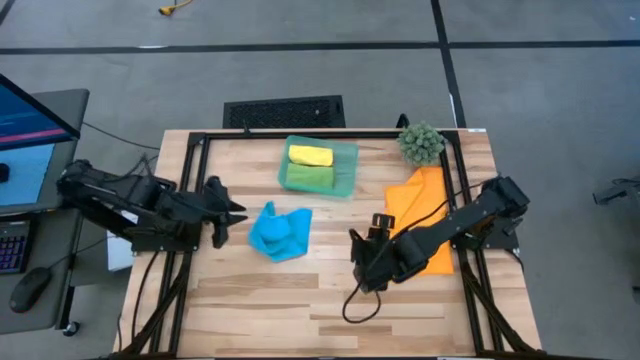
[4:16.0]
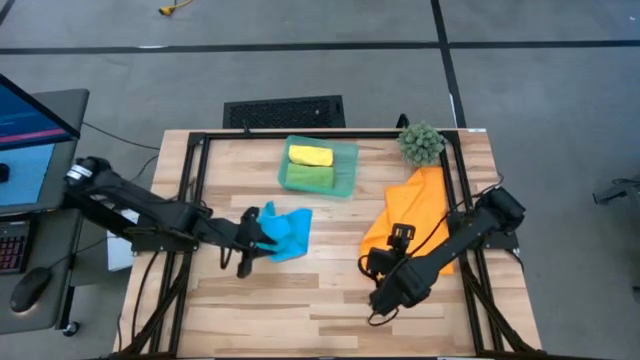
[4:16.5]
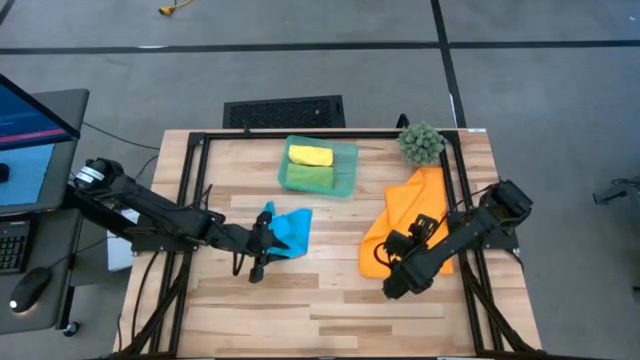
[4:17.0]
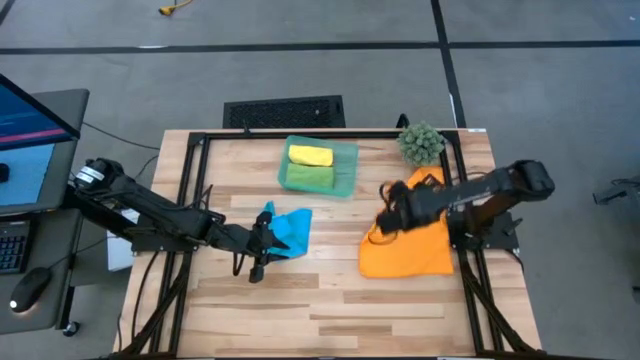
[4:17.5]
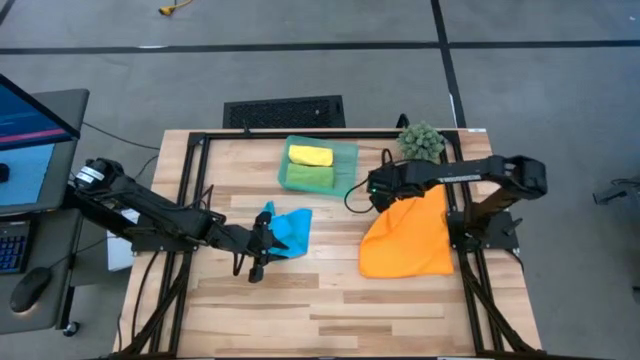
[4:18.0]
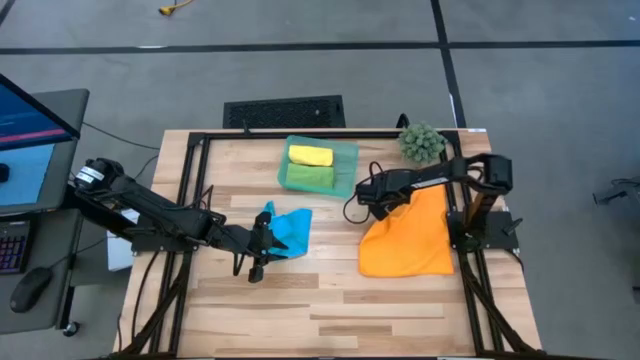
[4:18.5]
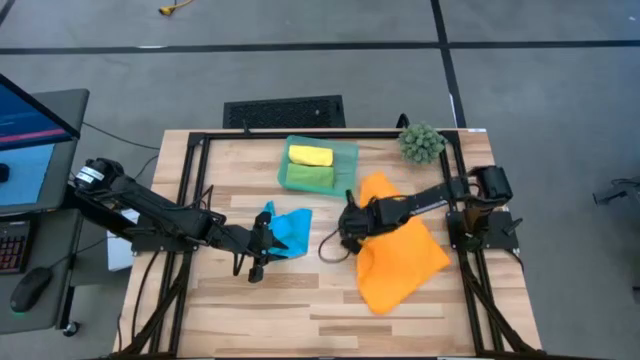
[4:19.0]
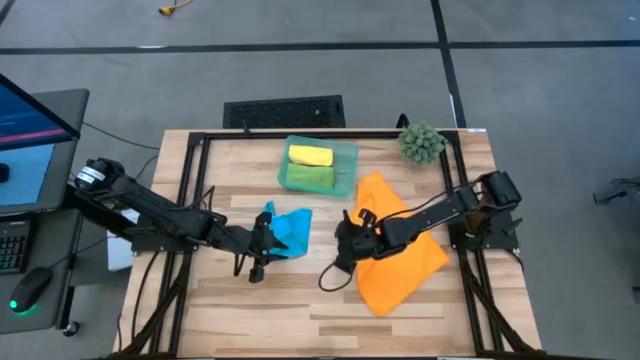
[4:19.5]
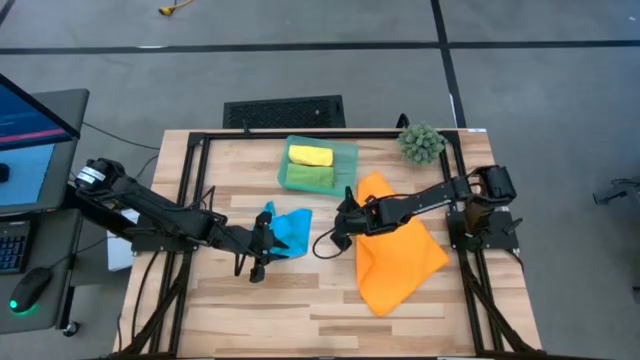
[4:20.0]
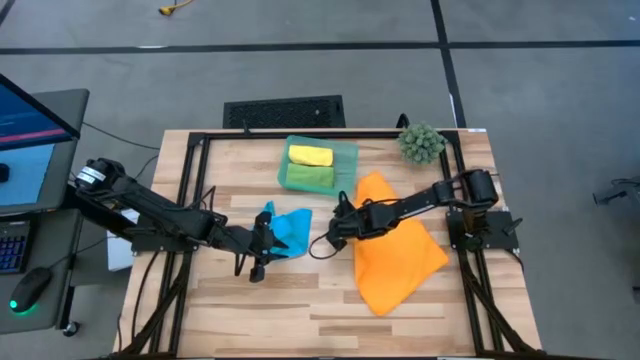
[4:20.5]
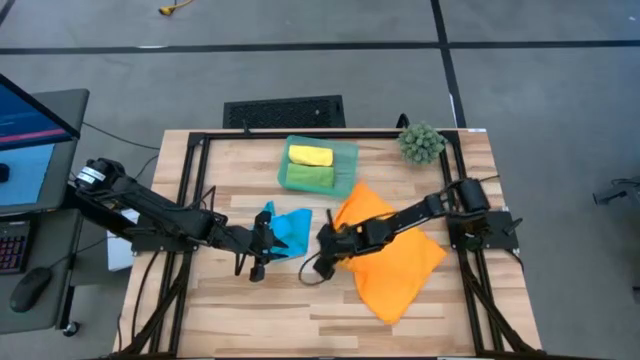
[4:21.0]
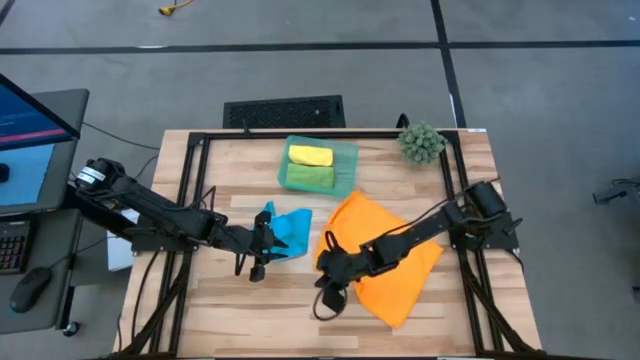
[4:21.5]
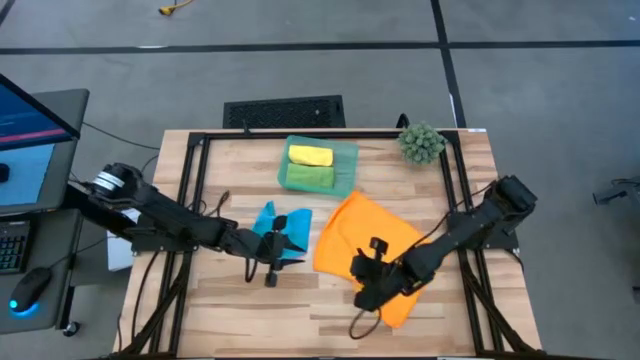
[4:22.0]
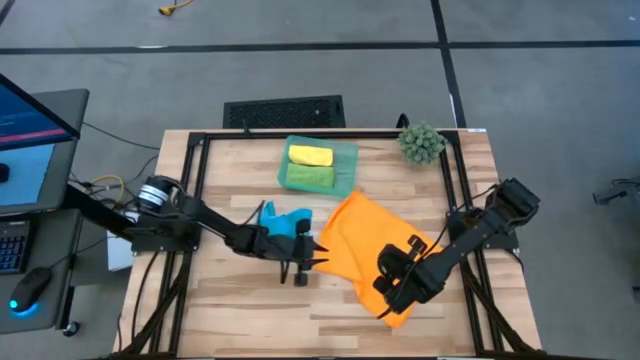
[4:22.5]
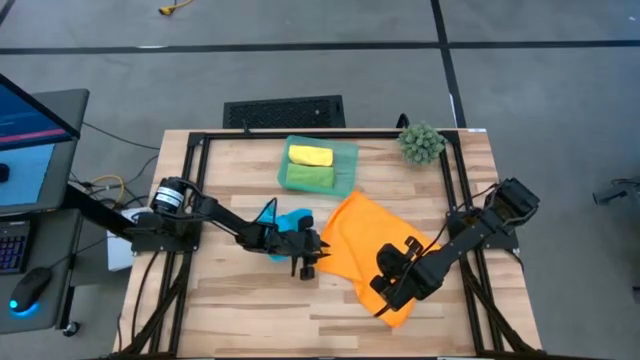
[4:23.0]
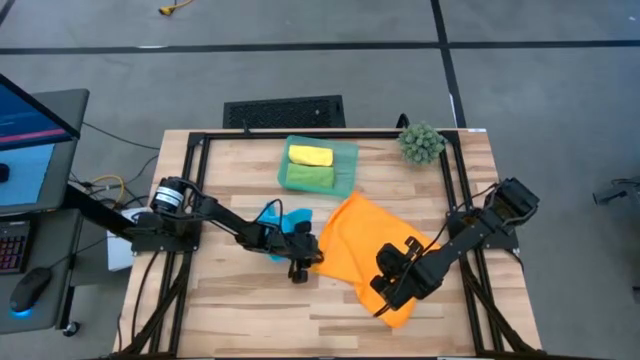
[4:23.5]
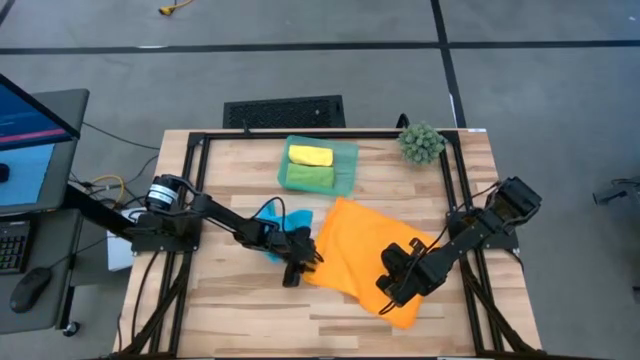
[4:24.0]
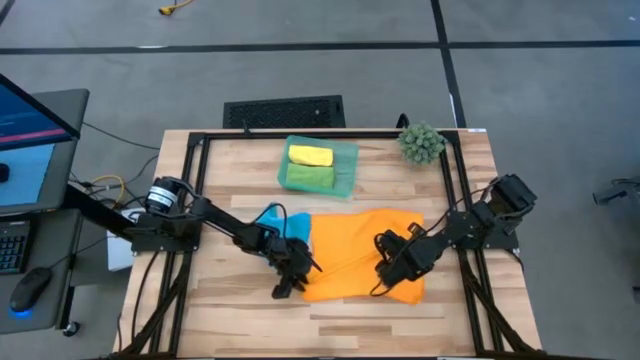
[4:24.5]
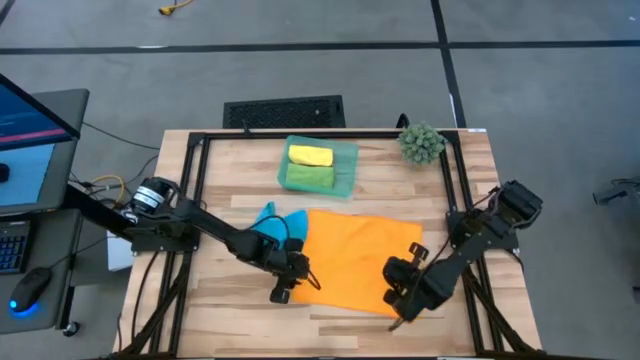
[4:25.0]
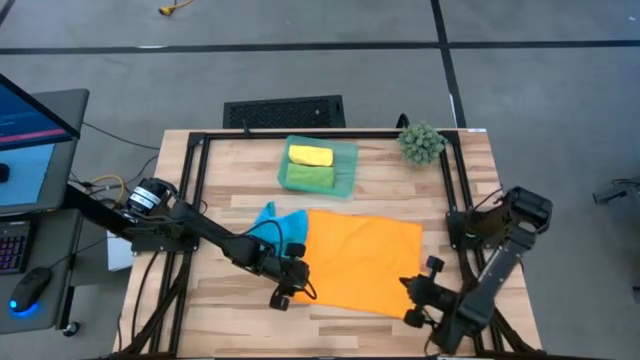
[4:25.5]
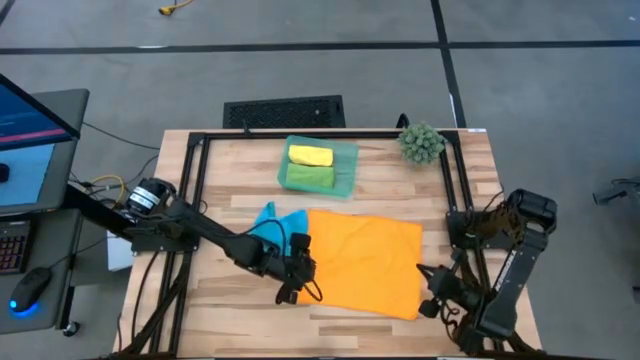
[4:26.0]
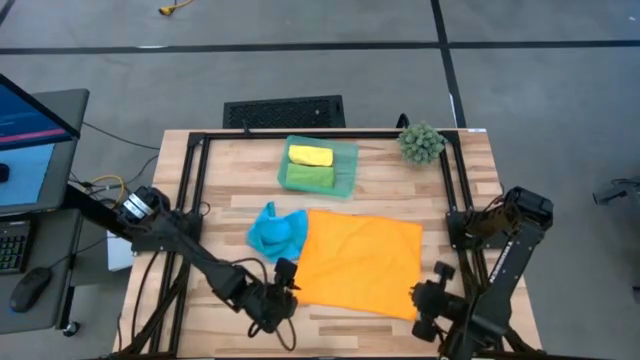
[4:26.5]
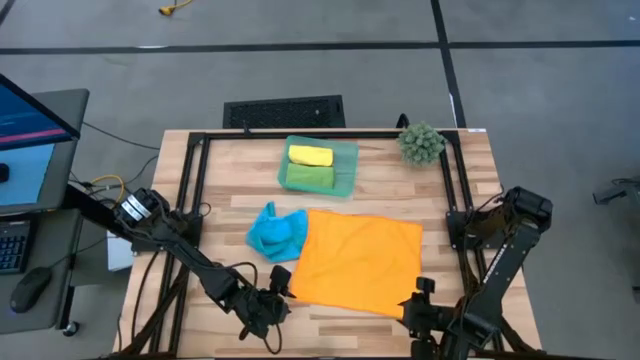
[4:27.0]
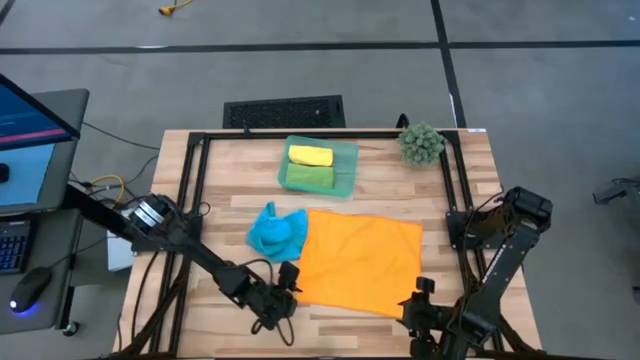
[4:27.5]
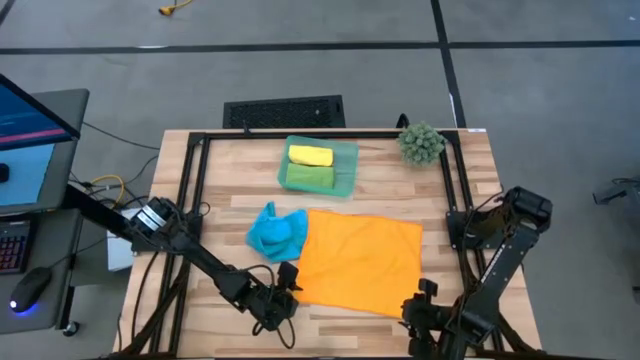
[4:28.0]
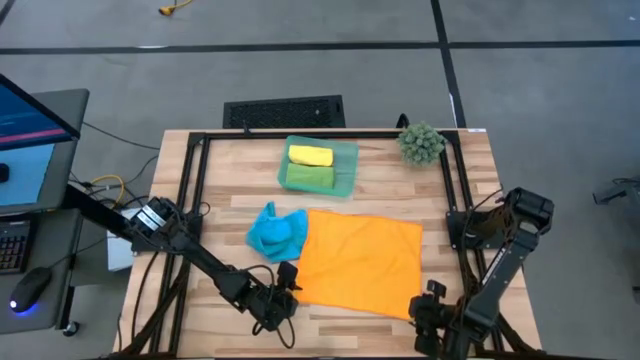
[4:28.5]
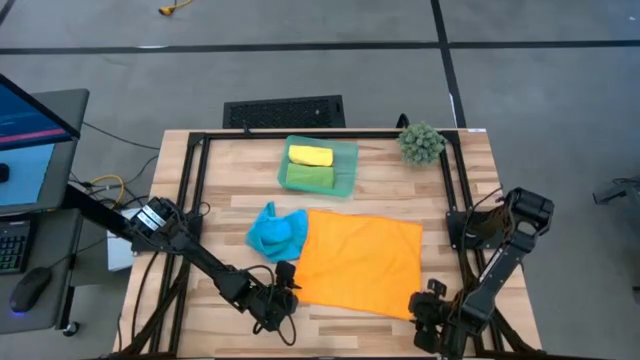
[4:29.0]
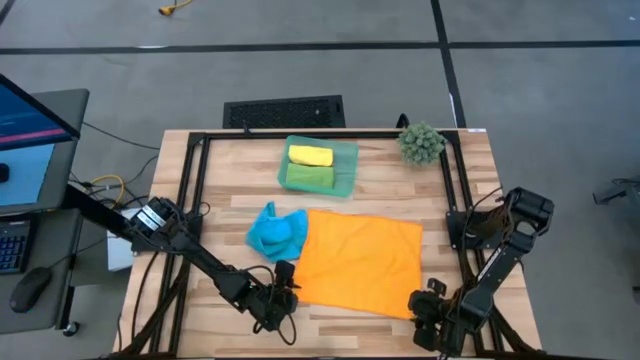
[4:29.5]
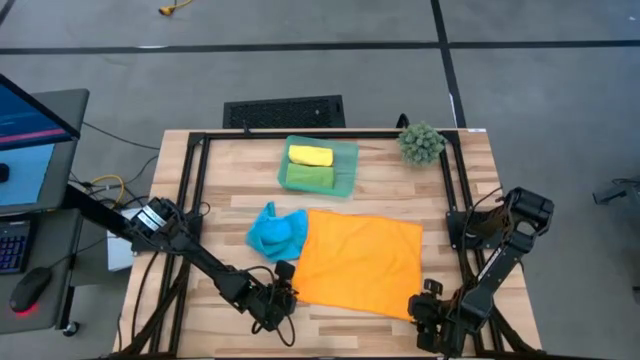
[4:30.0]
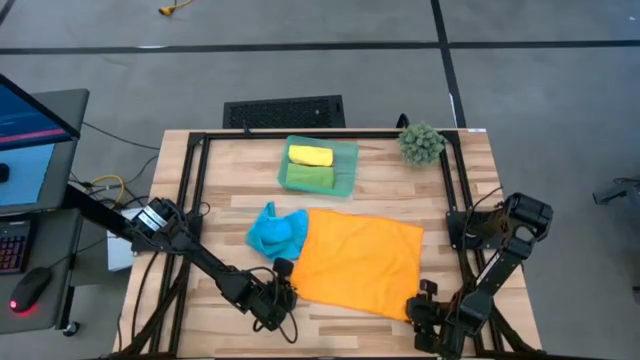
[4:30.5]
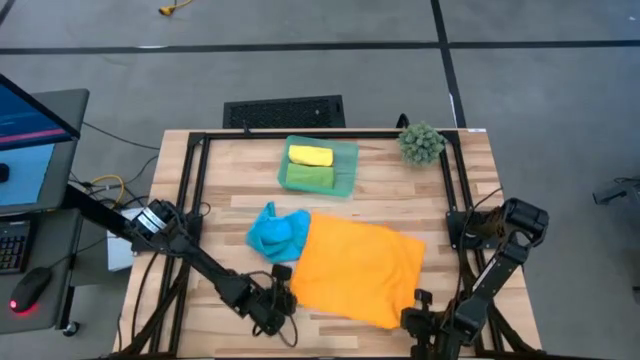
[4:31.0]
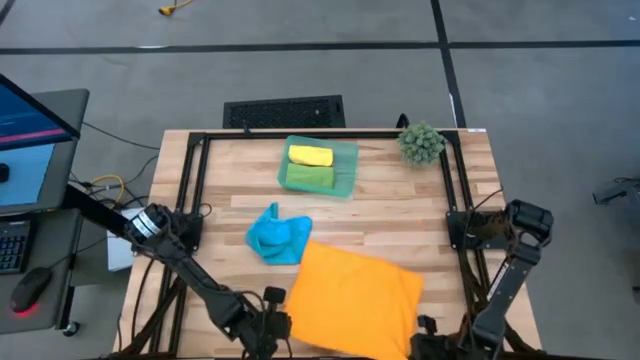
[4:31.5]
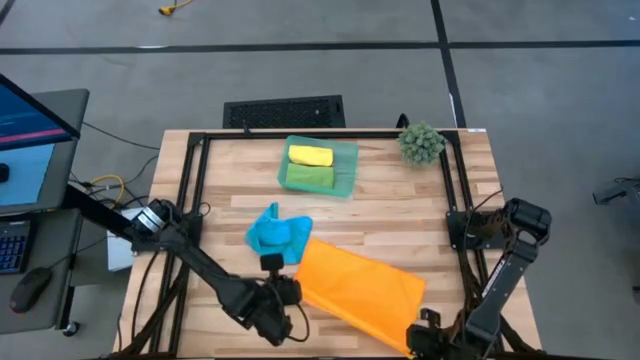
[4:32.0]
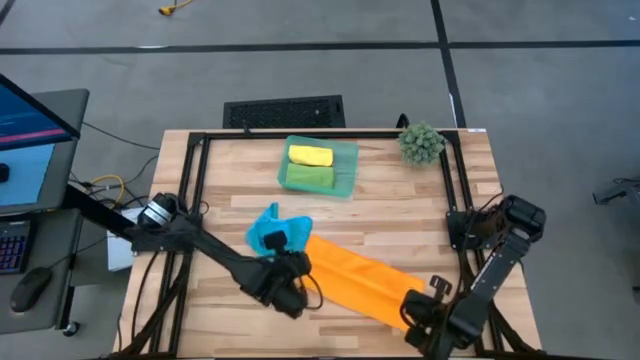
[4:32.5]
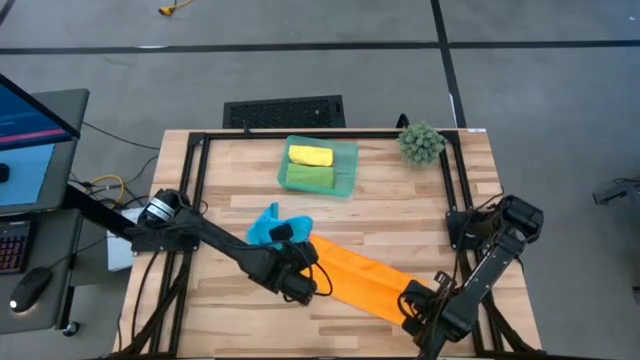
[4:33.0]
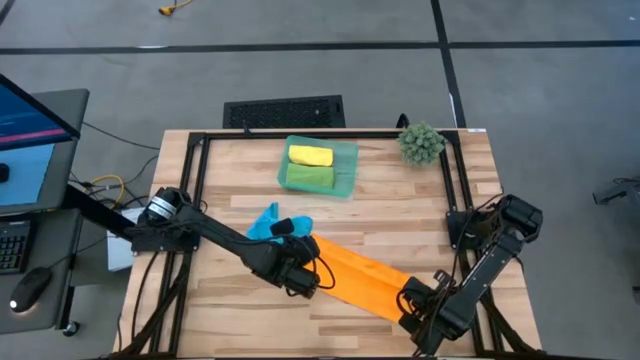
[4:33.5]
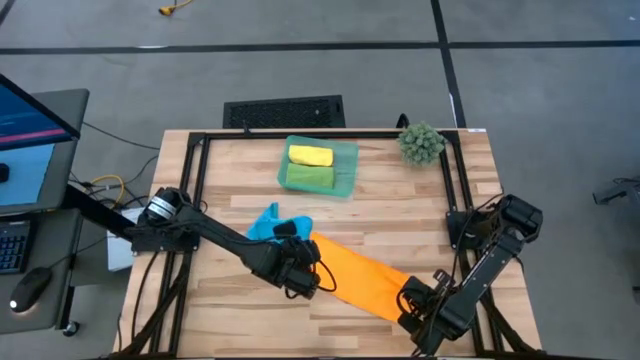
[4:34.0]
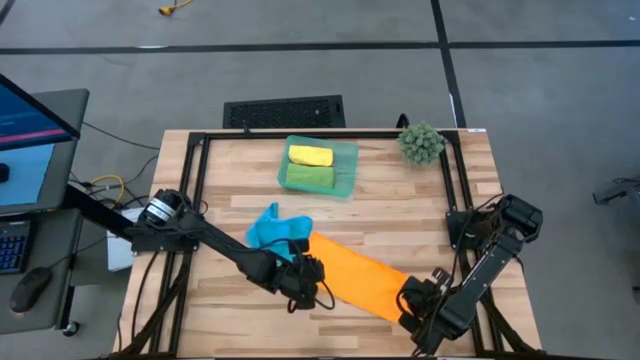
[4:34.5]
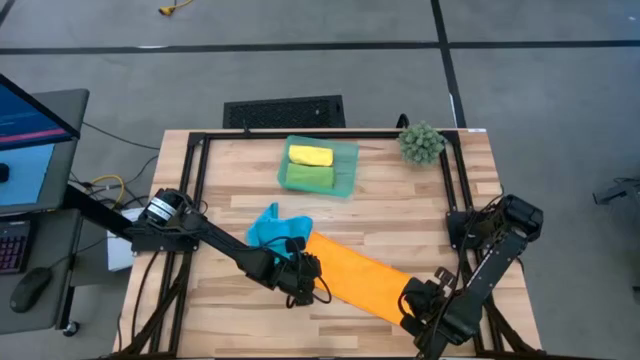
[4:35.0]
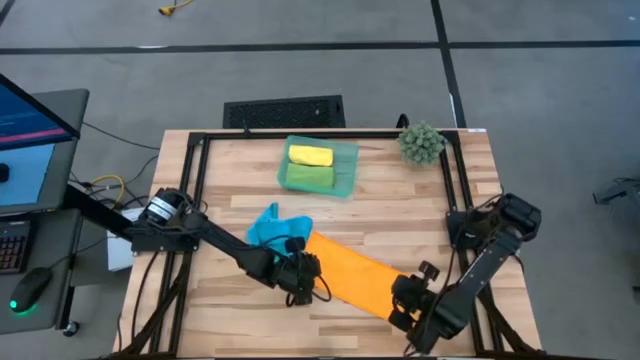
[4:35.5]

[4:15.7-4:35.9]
Task: Roll microfiber towels into tight, uniform cylinder then place into a basket
Roll the orange microfiber cloth

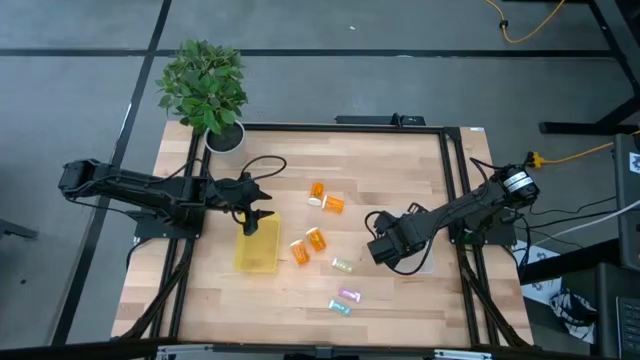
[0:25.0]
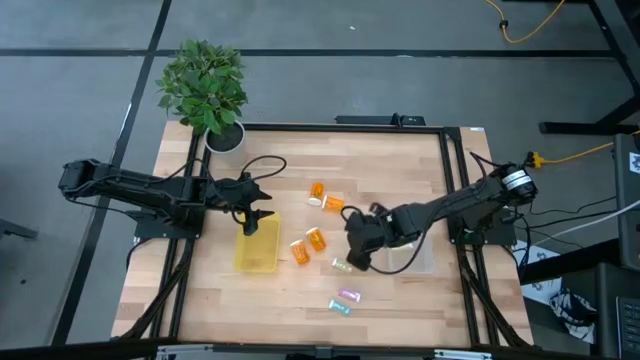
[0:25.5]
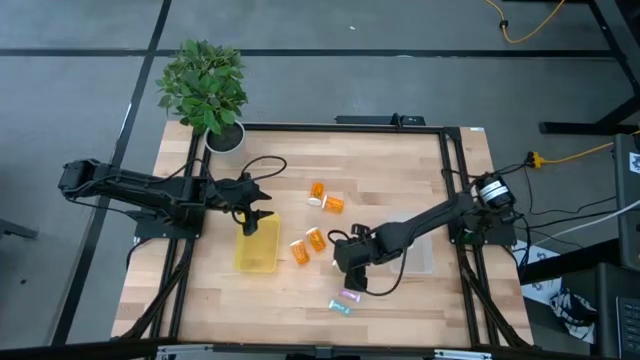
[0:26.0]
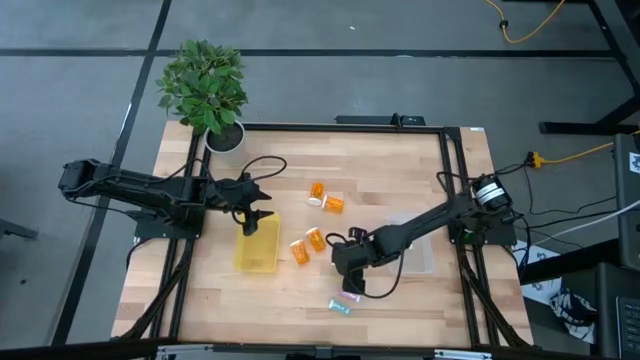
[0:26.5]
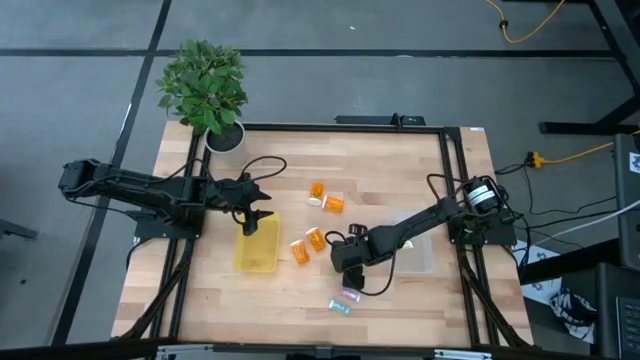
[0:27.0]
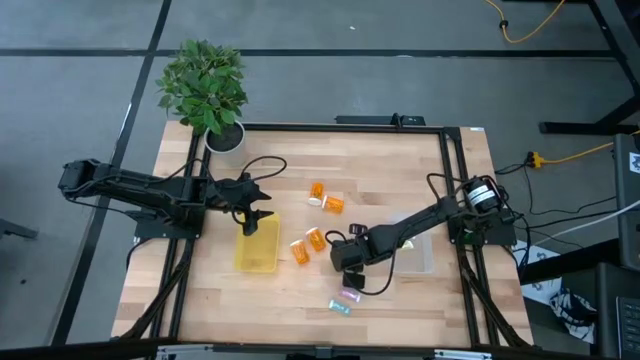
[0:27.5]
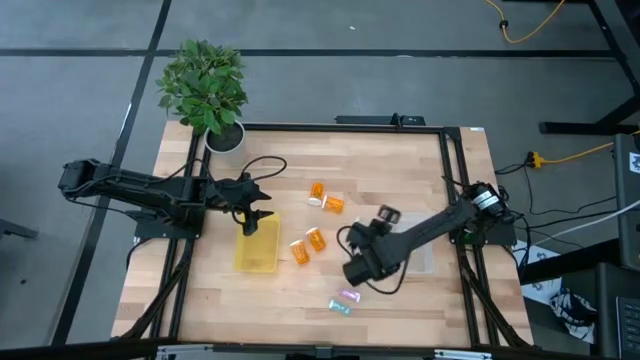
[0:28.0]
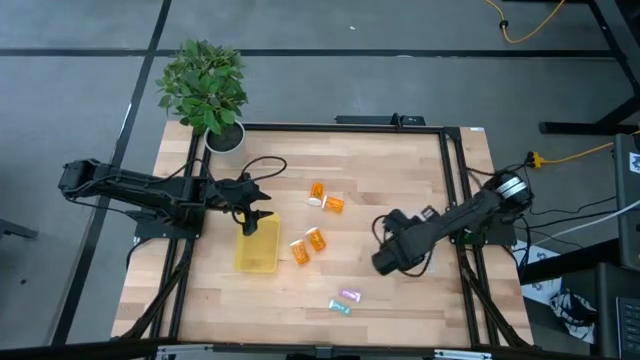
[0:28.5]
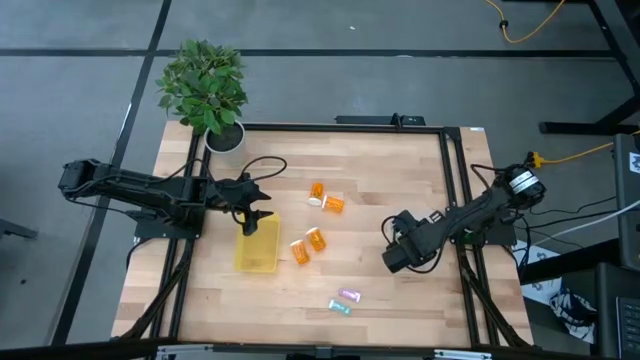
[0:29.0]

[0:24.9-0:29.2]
Task: Pick and place medicine bottles into bin by pill shape (circle, oval)
Put the yellow pill bottle into the transparent bin
